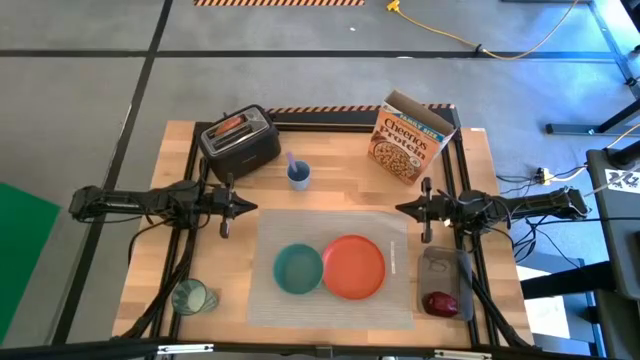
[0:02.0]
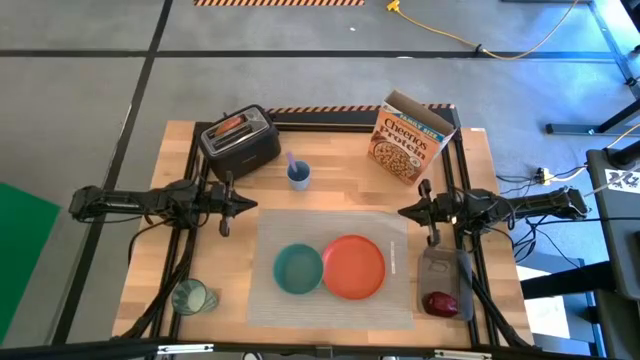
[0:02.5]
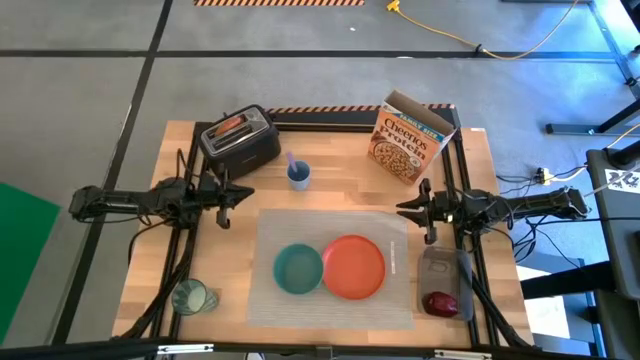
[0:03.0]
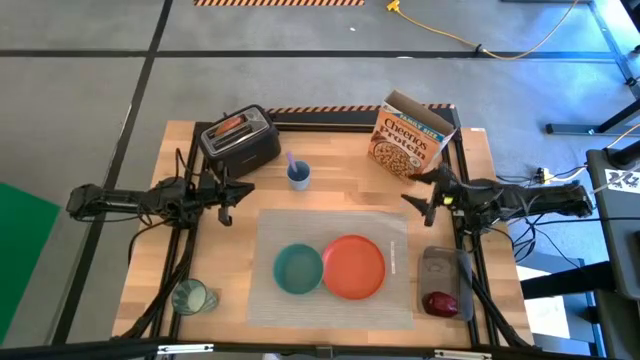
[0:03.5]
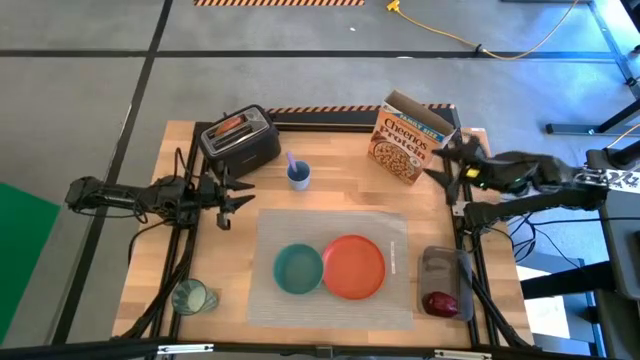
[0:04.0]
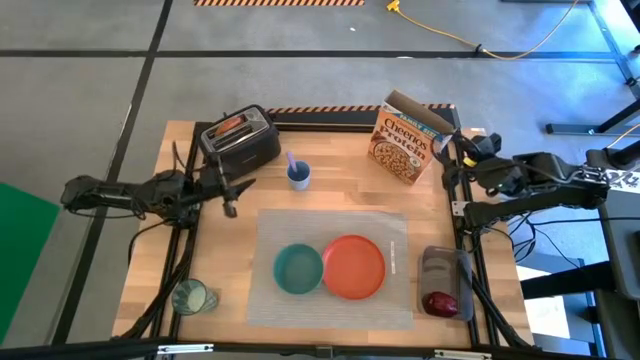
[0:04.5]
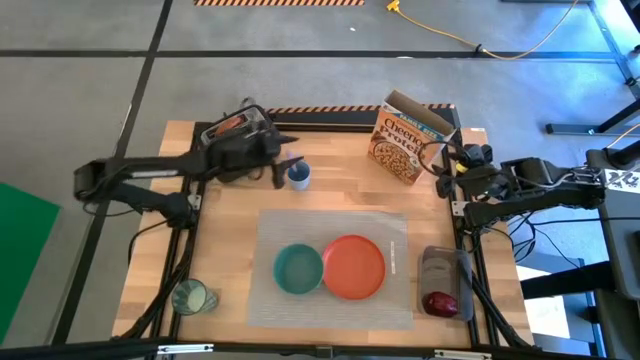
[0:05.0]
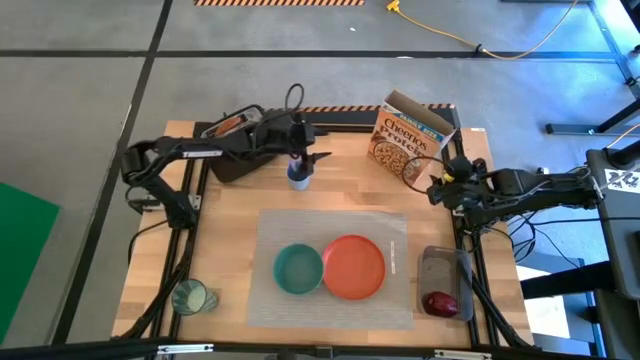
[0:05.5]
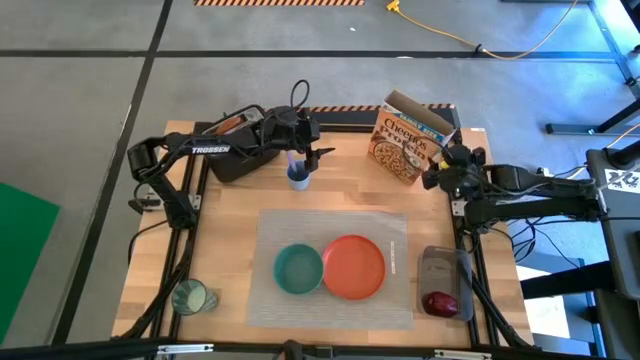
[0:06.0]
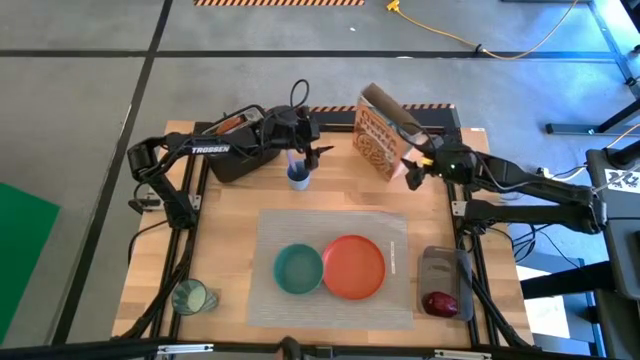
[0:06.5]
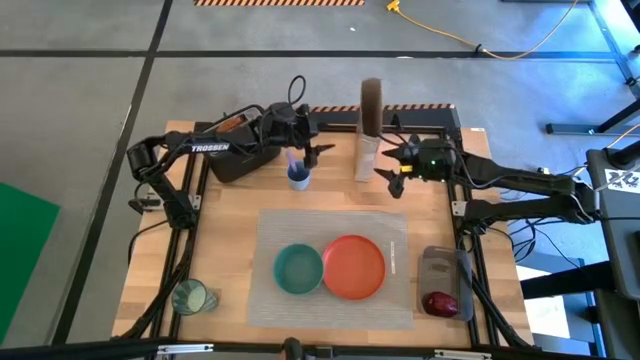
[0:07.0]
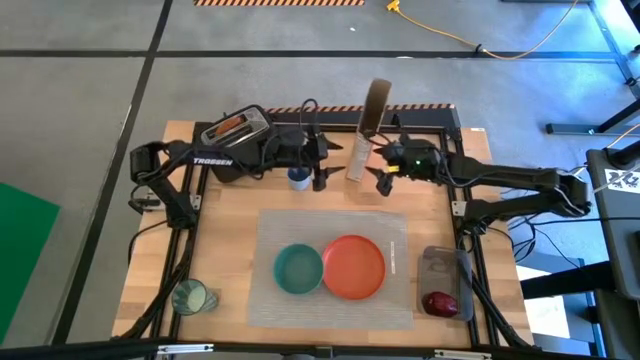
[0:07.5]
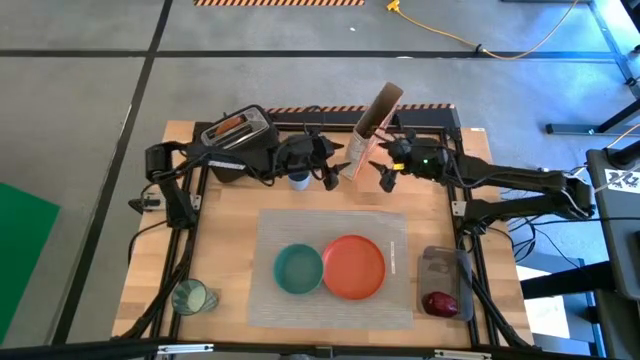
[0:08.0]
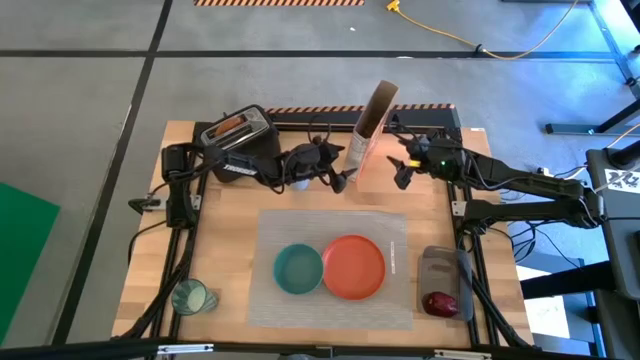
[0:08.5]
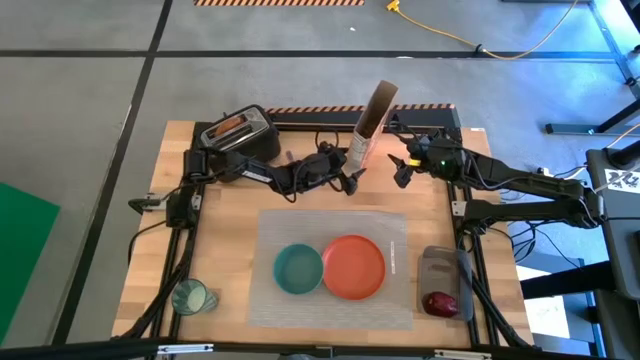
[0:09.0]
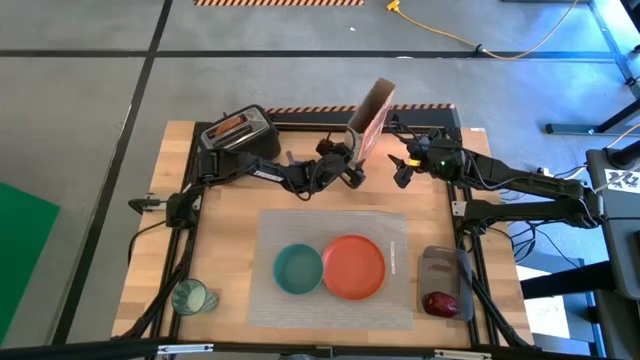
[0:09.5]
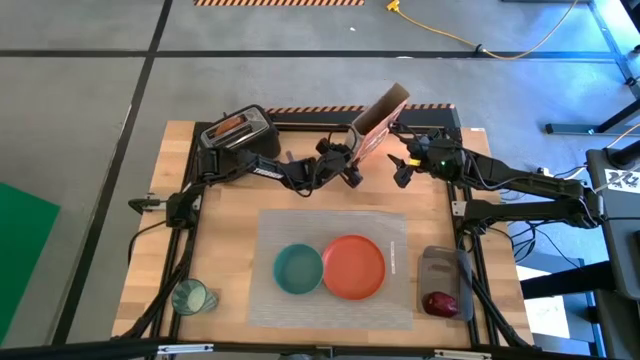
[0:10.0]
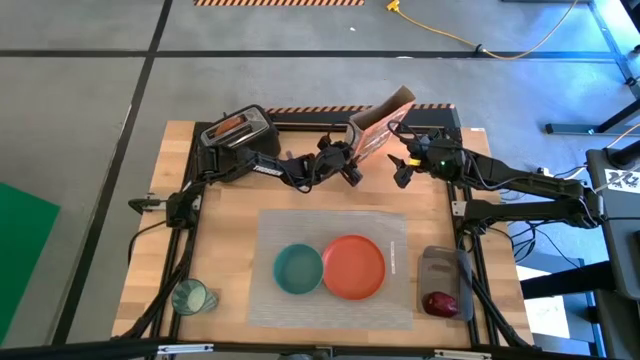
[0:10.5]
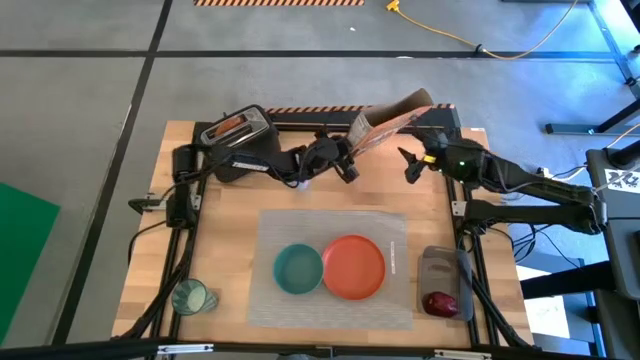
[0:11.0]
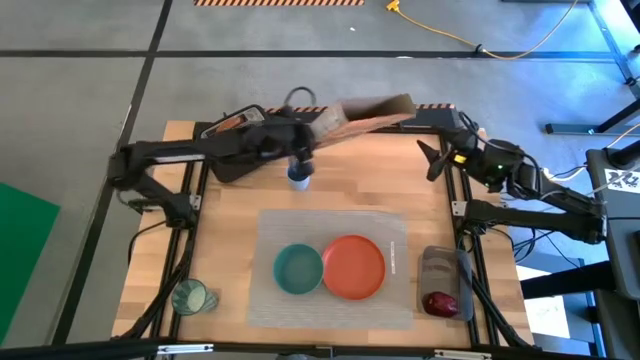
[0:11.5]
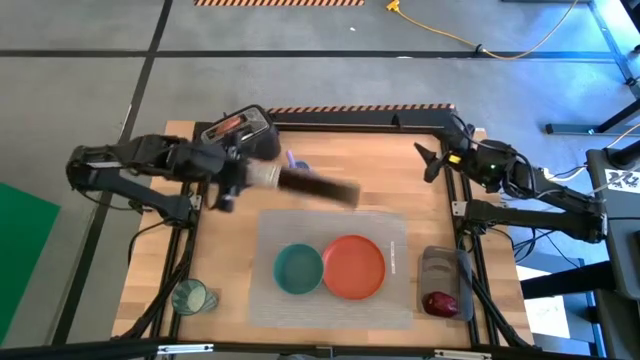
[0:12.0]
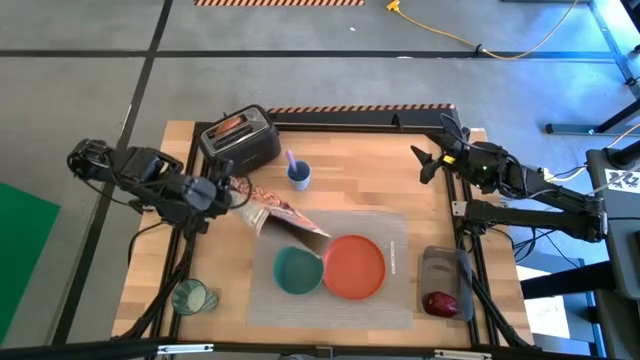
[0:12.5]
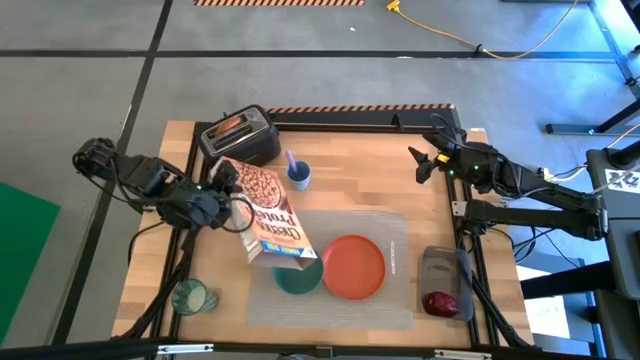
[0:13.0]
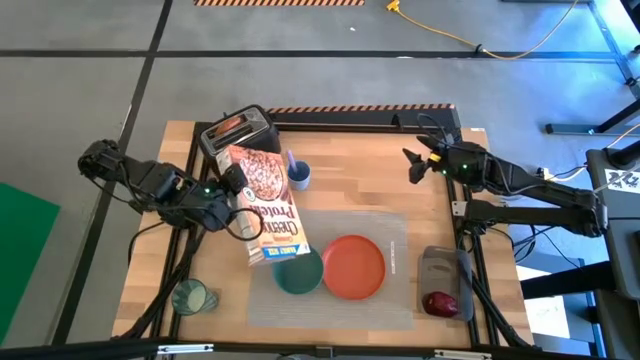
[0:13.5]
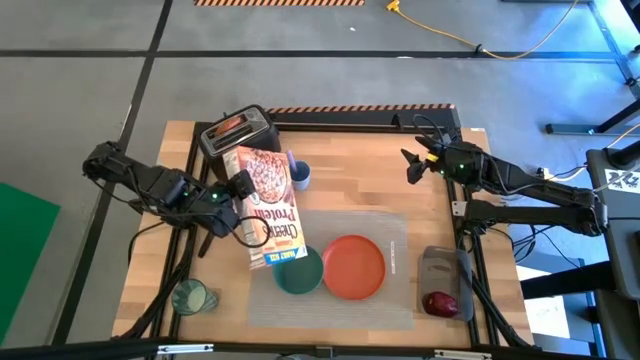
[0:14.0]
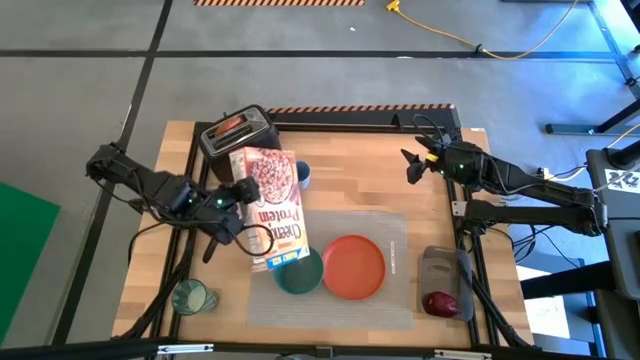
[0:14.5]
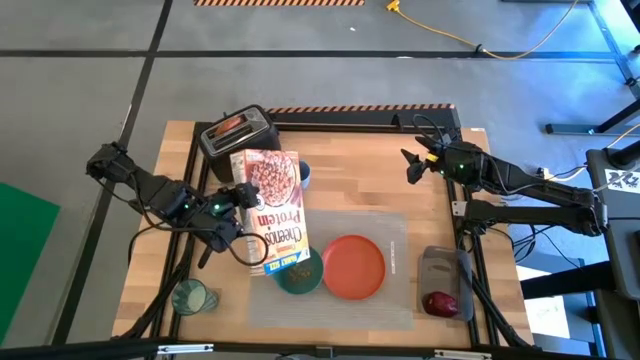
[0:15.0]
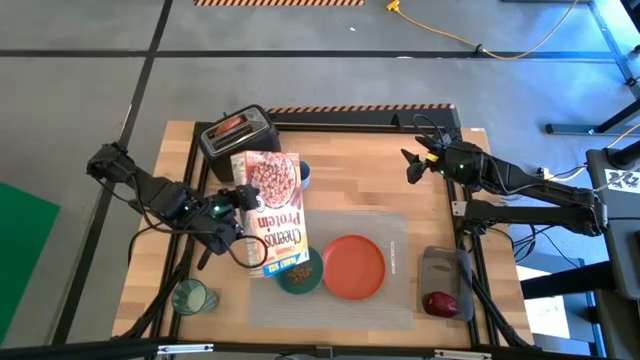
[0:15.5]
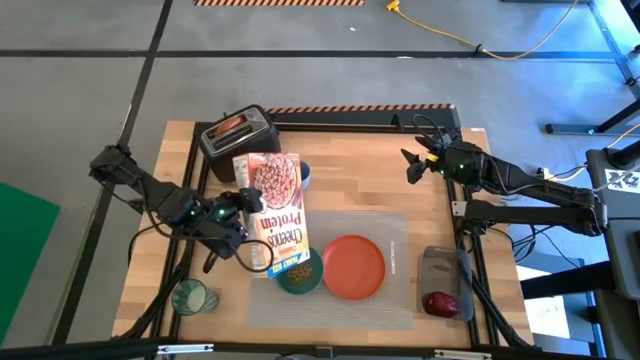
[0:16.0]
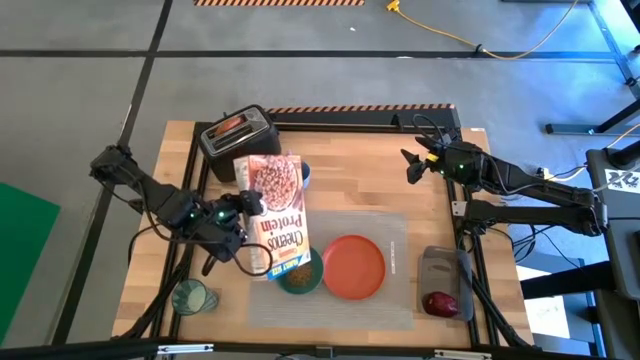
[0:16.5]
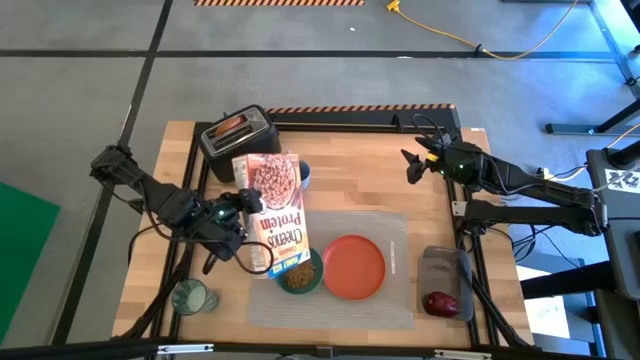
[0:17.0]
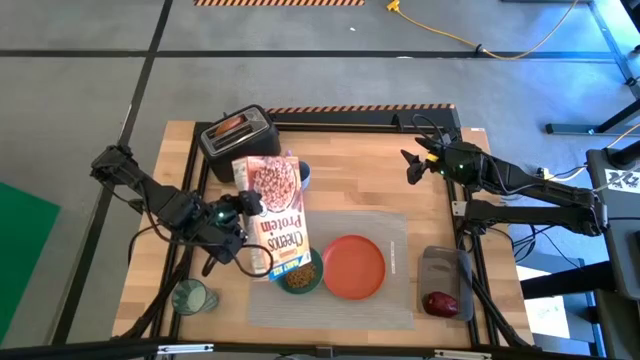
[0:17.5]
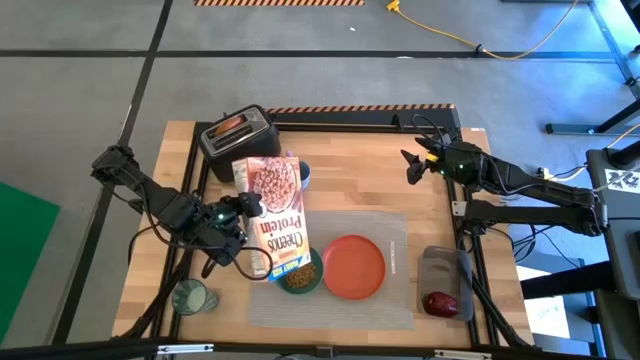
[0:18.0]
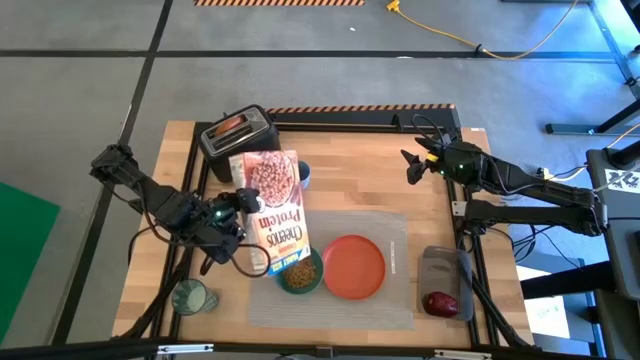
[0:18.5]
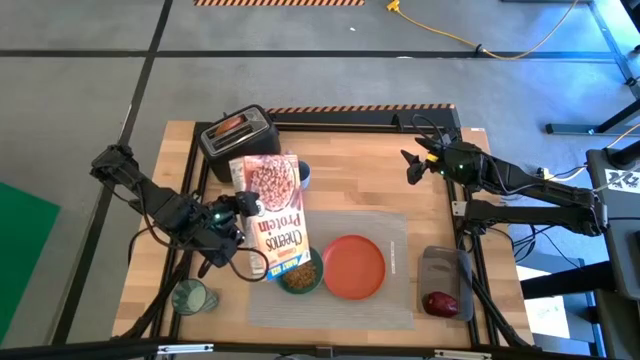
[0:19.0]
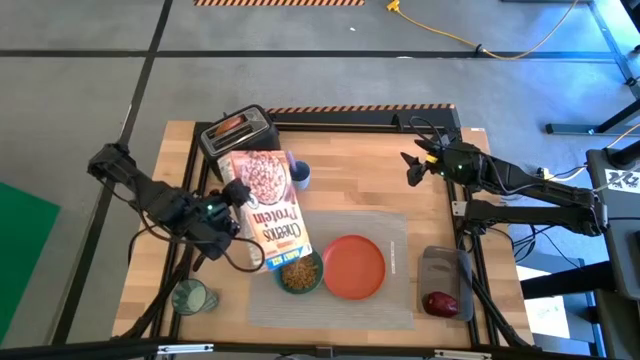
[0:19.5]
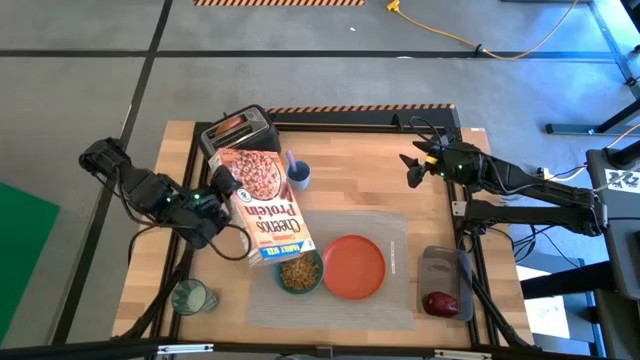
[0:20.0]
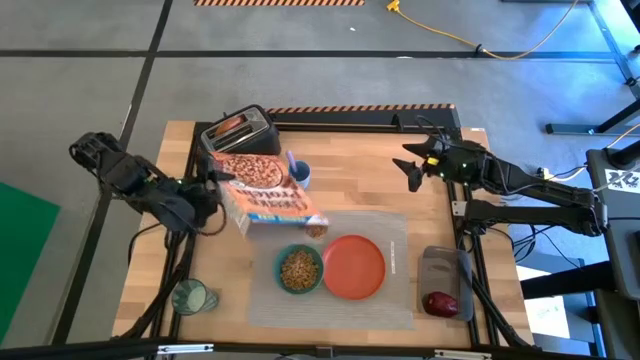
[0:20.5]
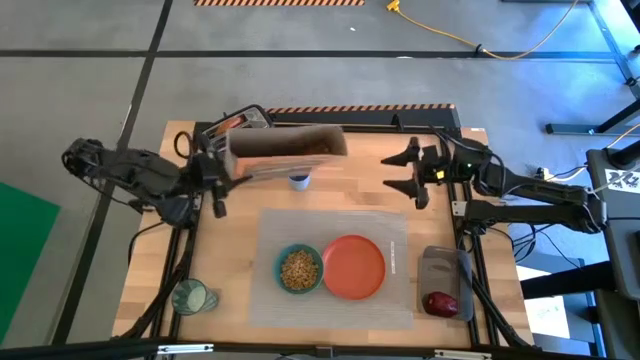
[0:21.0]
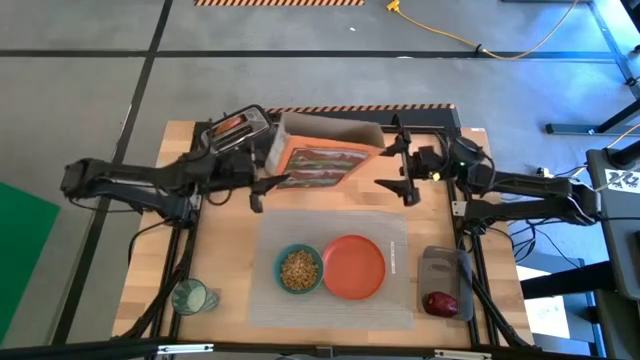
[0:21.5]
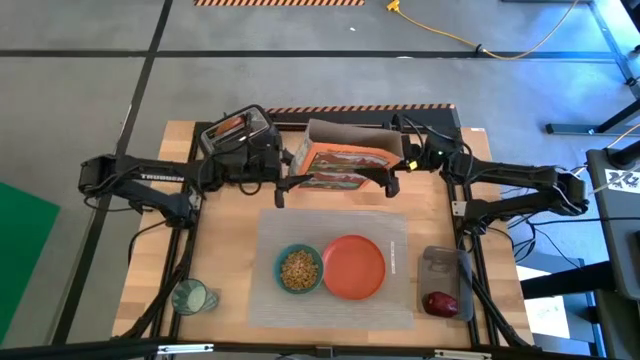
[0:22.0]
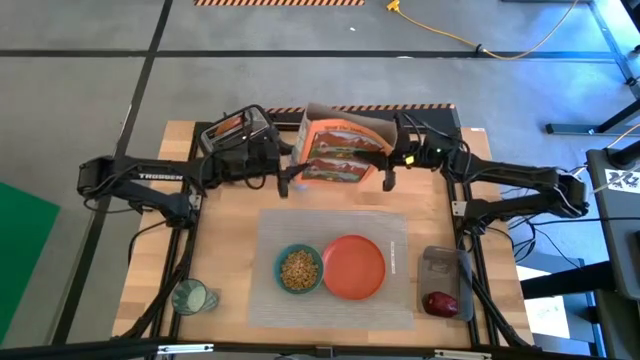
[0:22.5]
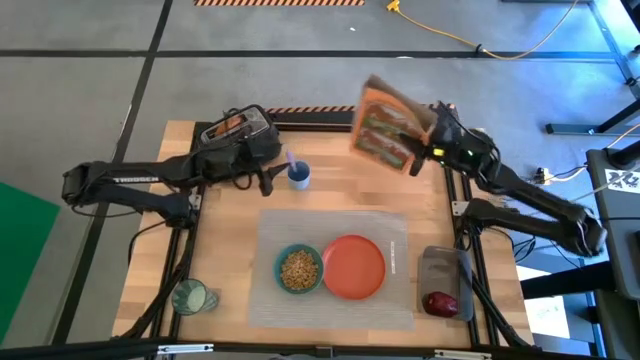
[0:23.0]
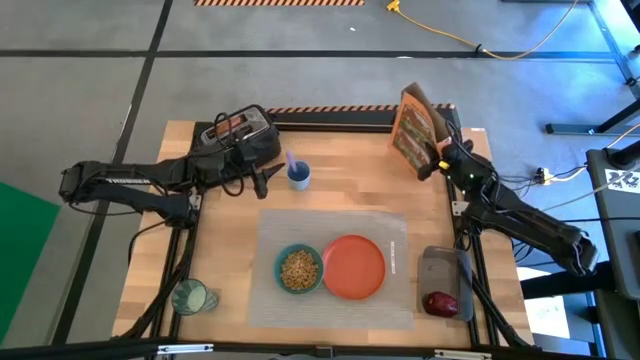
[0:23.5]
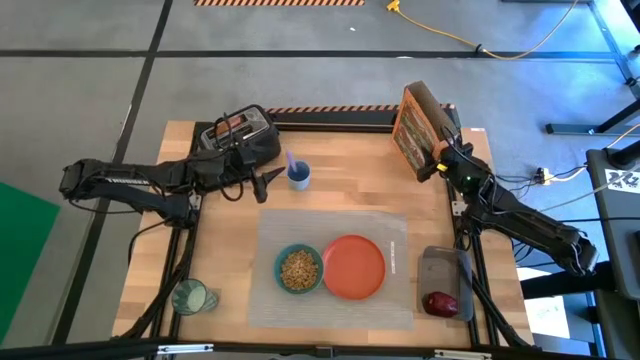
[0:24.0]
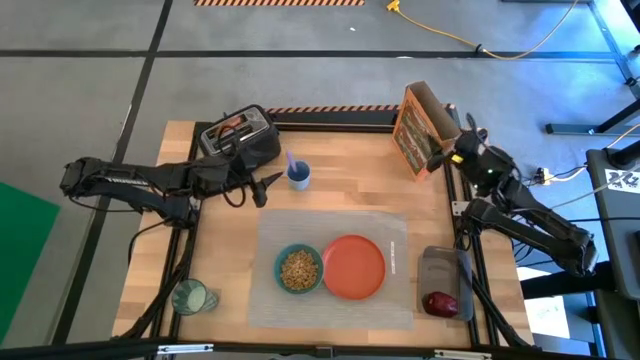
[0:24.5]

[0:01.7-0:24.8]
Task: Arrange a breakfast setting
Pour the cereal from the cereal box into the green bowl
